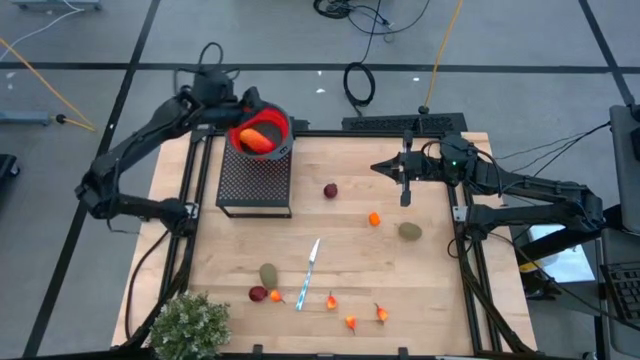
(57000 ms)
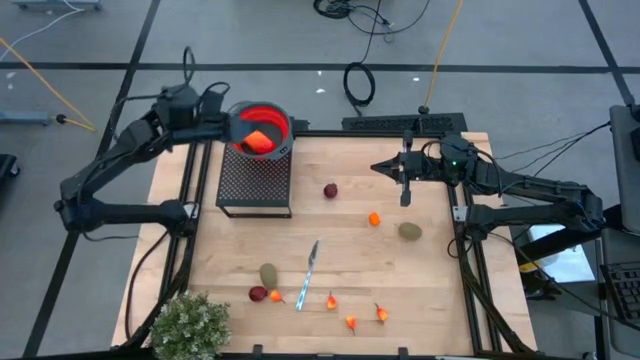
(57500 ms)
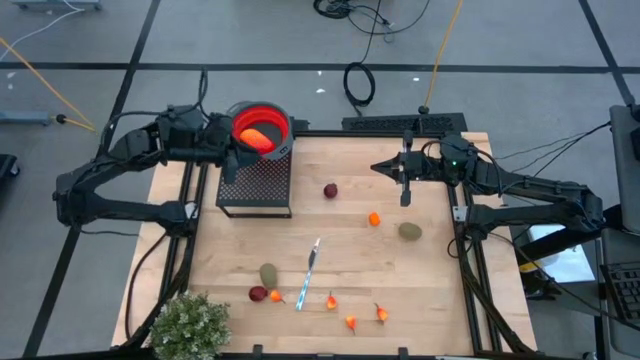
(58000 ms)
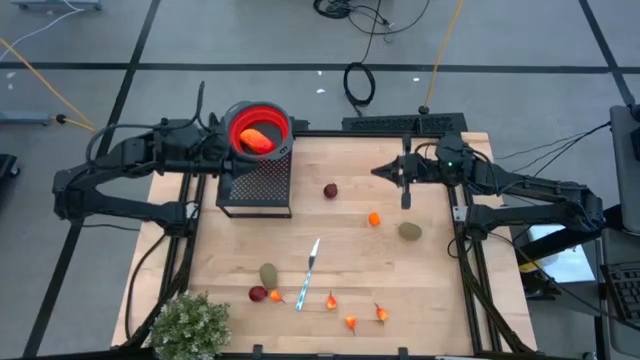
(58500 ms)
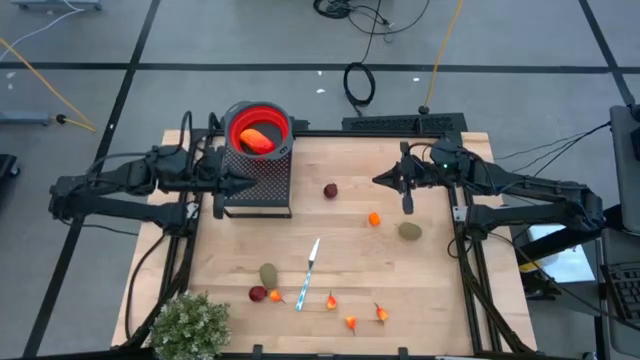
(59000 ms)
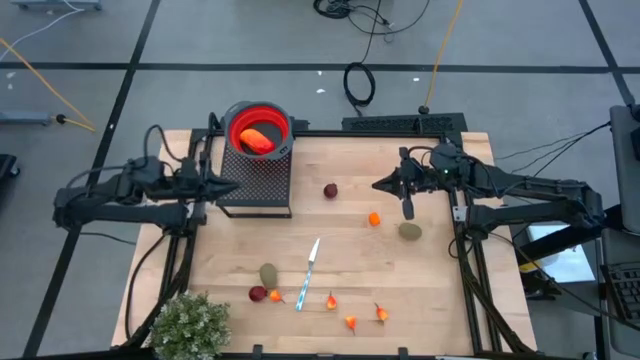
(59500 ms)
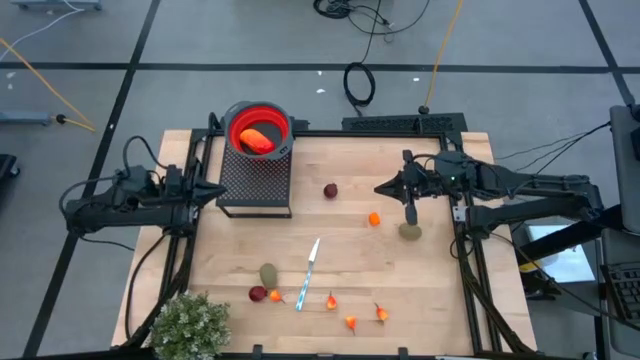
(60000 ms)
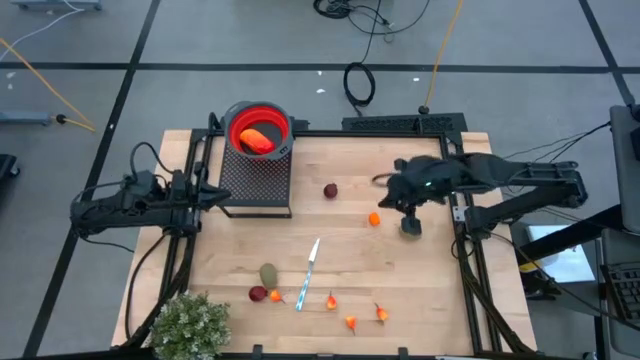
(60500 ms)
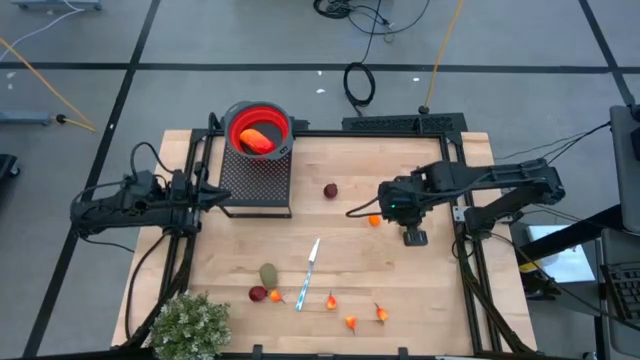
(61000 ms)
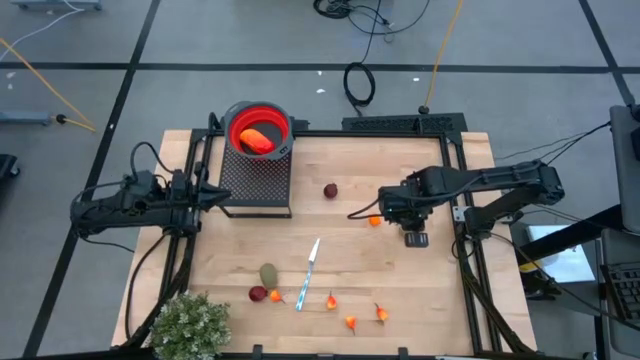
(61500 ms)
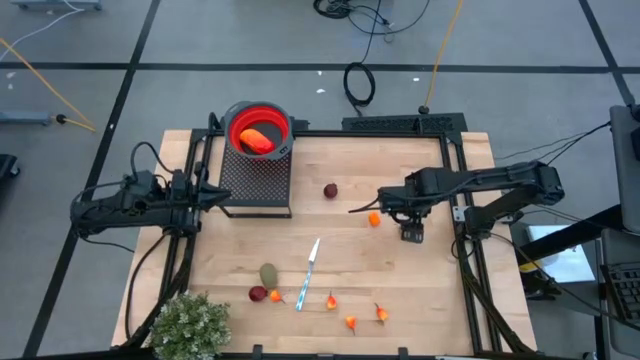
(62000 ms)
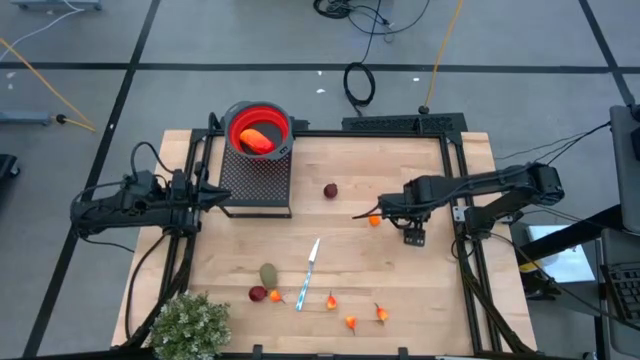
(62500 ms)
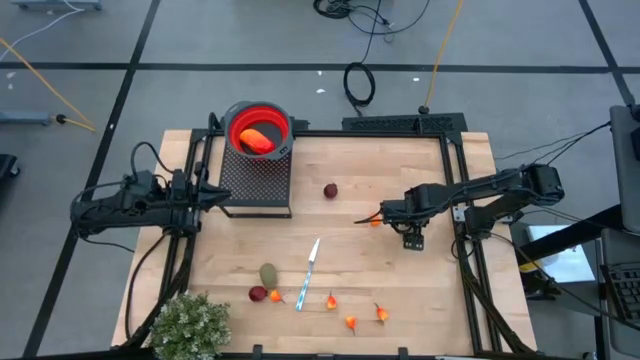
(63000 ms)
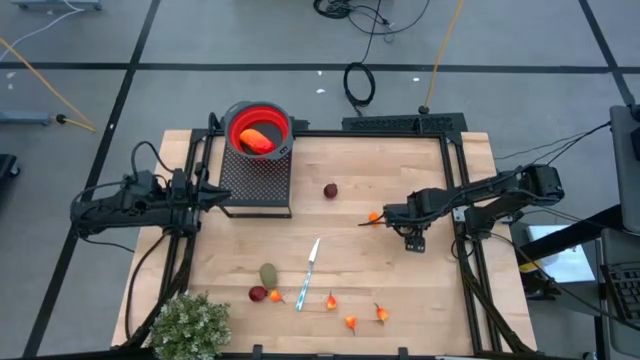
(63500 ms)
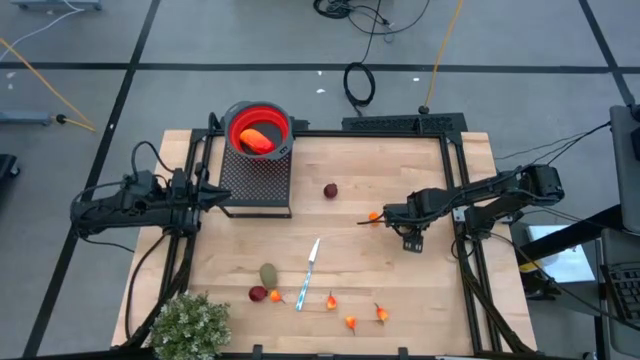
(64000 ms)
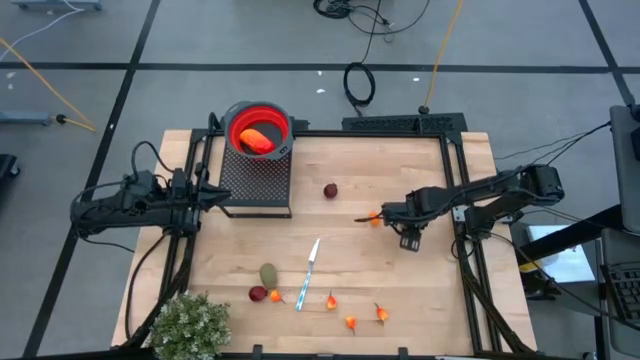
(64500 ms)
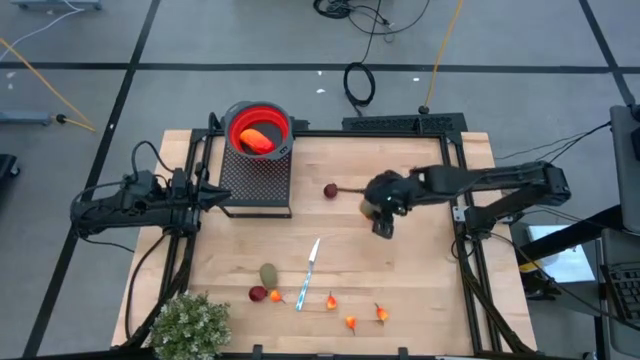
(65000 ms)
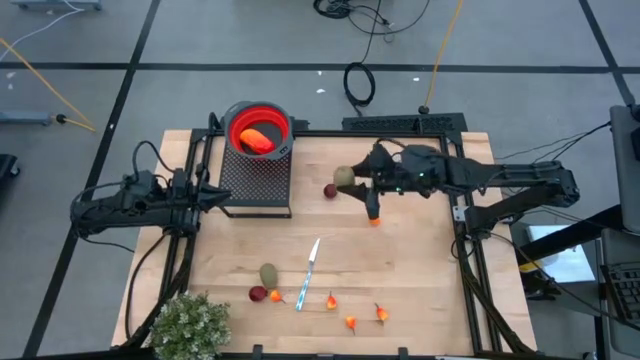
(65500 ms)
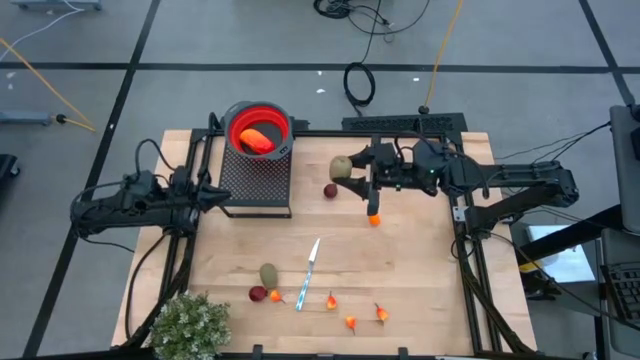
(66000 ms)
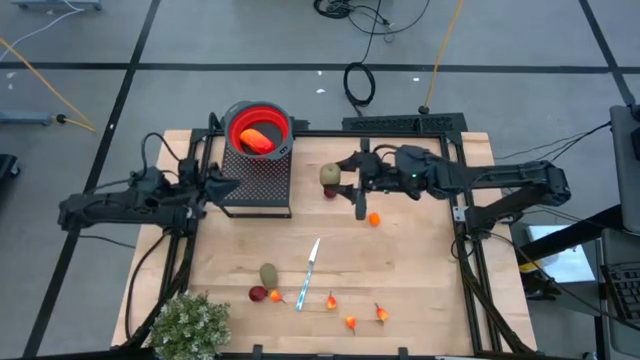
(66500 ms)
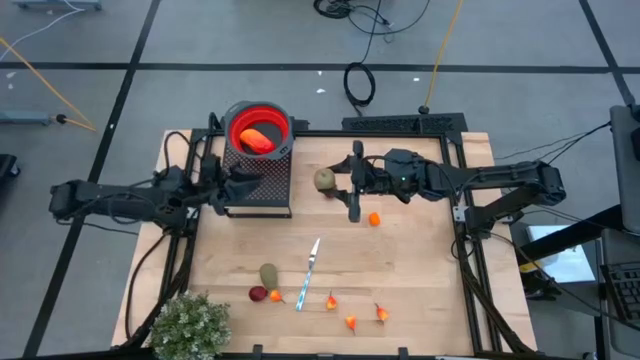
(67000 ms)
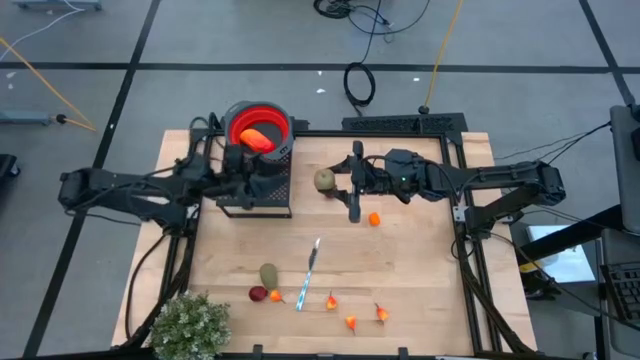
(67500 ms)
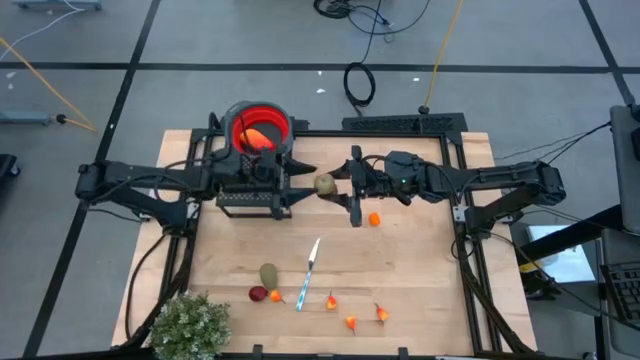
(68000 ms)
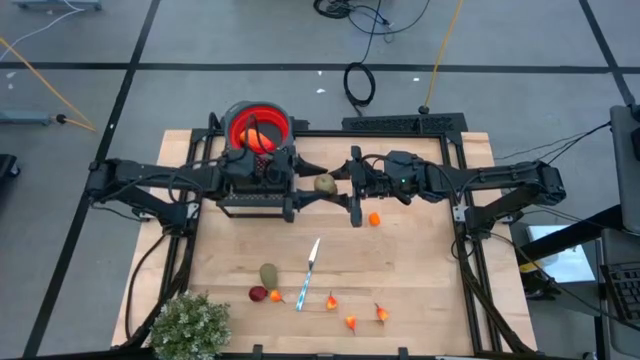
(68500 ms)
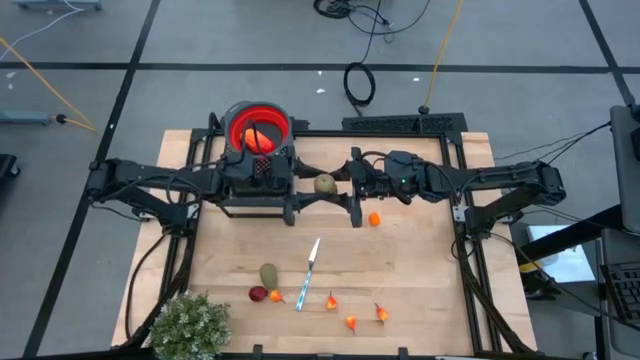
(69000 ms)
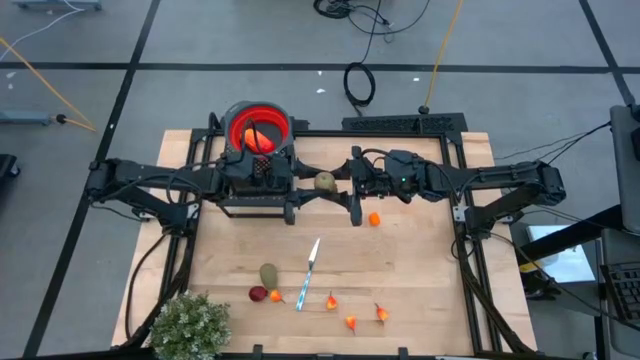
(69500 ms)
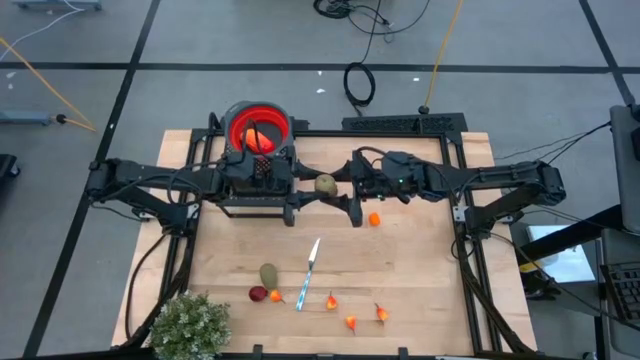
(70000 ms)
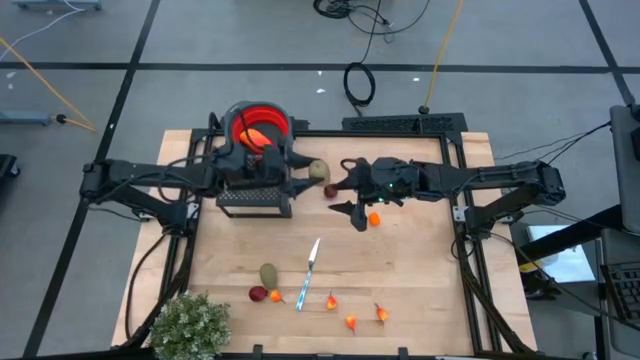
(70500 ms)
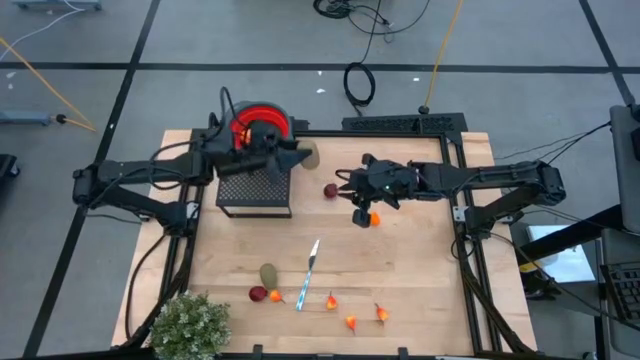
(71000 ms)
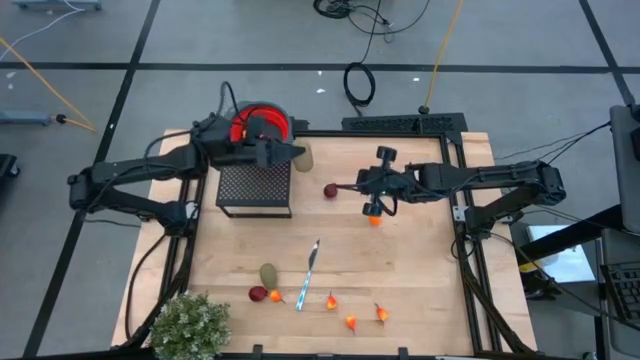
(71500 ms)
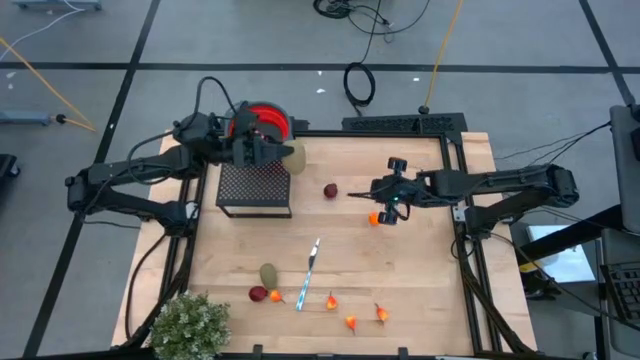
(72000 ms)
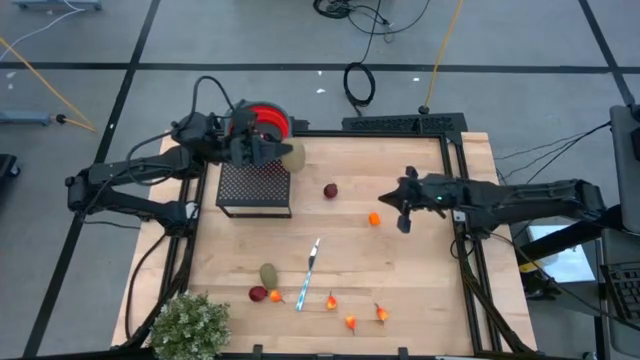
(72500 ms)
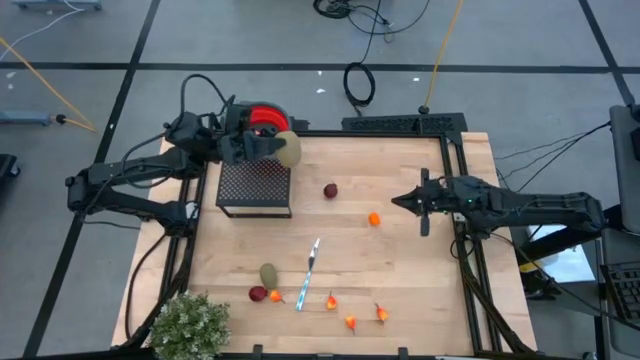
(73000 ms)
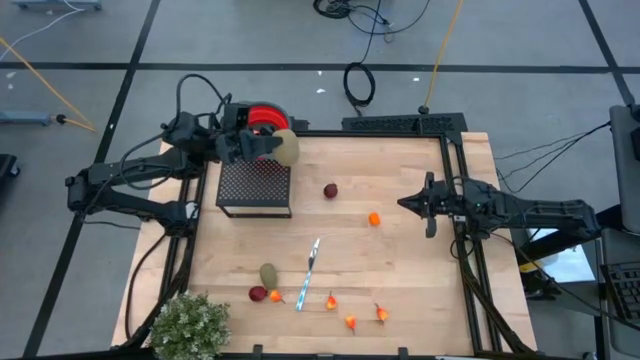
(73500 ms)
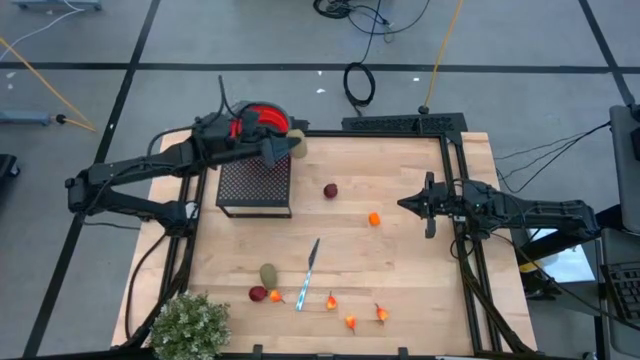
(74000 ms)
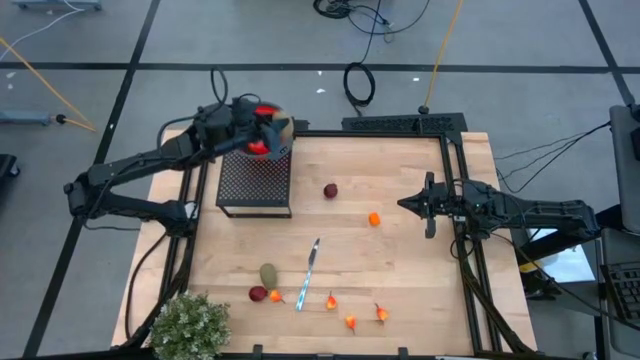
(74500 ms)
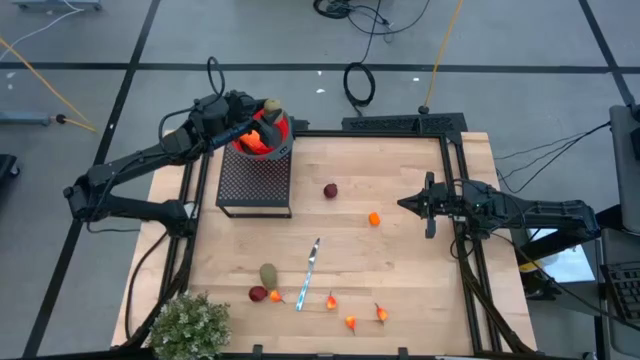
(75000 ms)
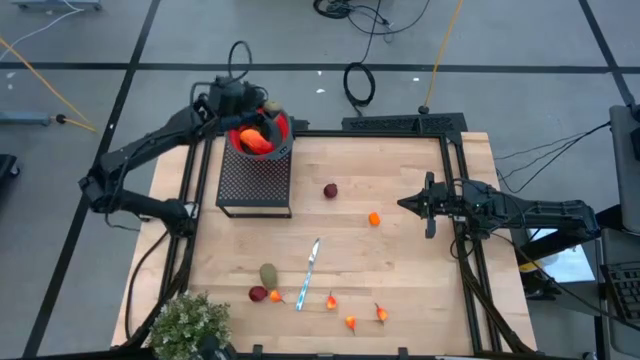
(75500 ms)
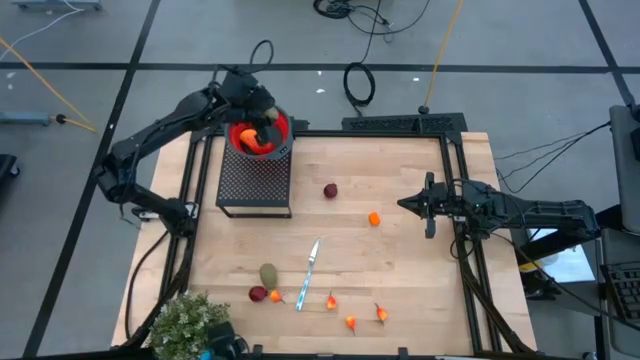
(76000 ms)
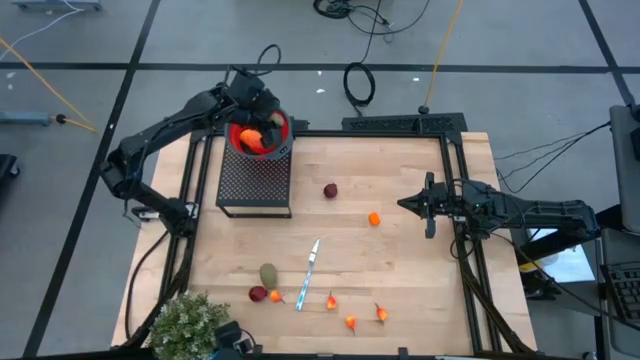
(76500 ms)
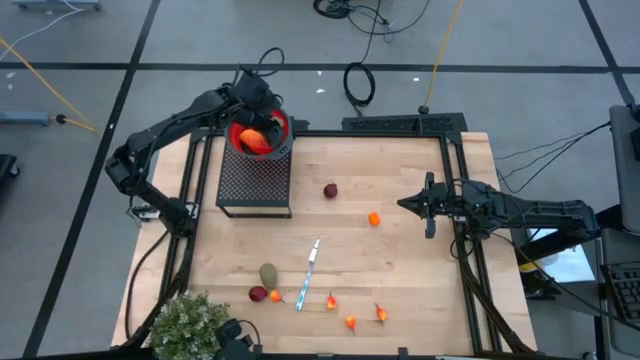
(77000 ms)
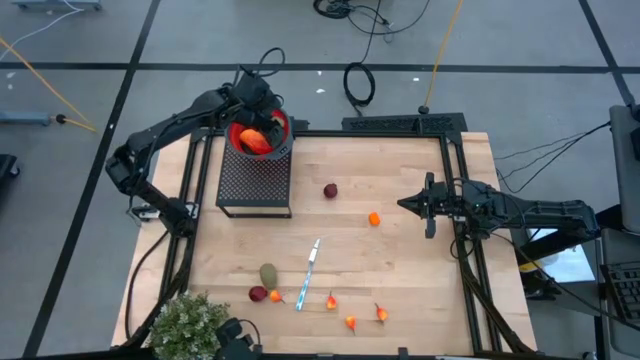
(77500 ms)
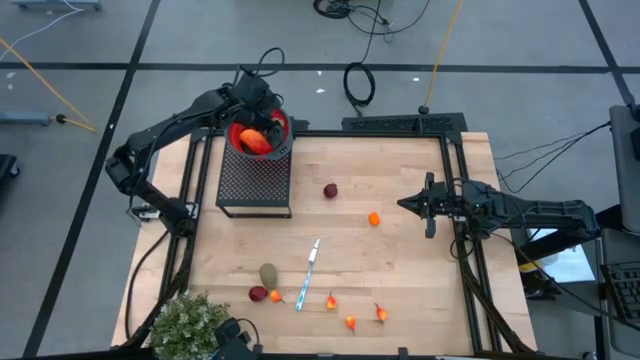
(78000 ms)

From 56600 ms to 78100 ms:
Task: Pick & Place Fruit
Put the green kiwi into the red strainer bowl on the shelf

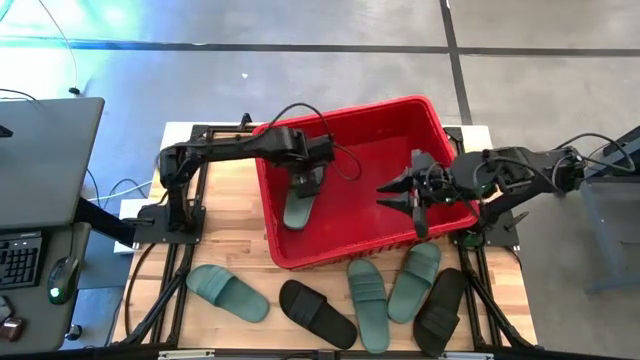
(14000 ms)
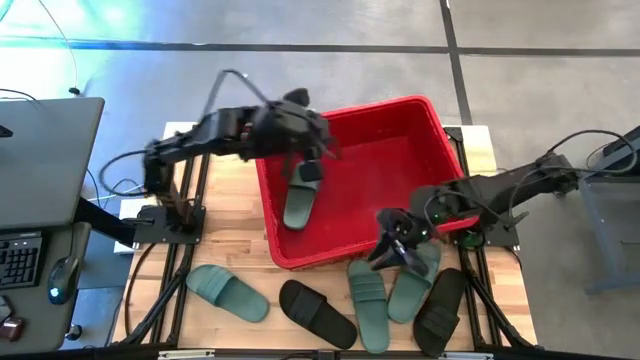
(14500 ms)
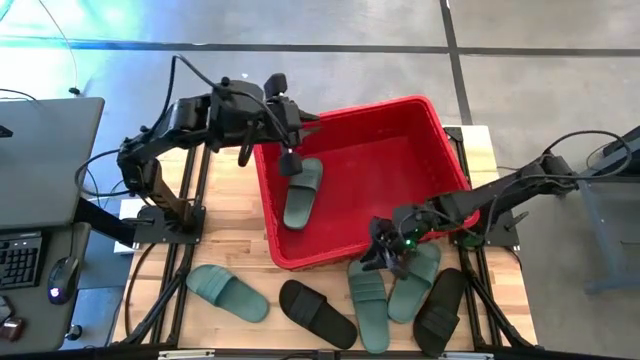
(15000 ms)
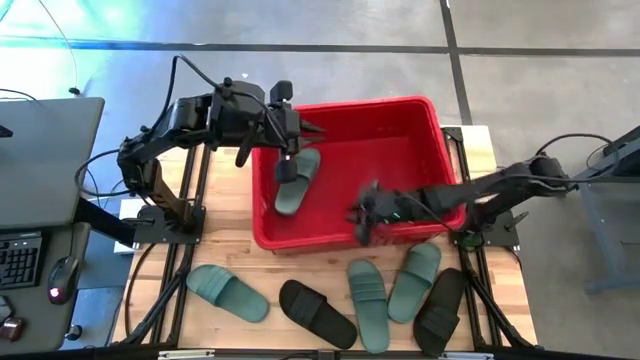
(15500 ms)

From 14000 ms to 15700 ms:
Task: Pick and place slides into bin
Adjust the red bin on the table
